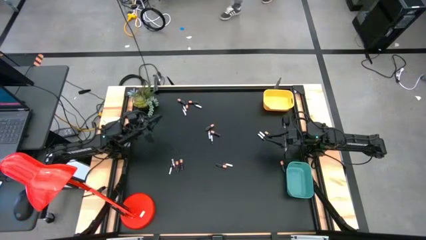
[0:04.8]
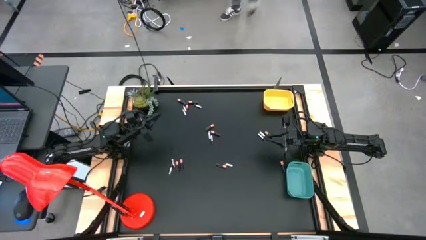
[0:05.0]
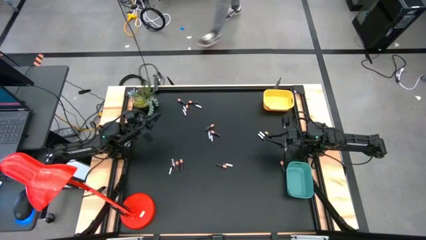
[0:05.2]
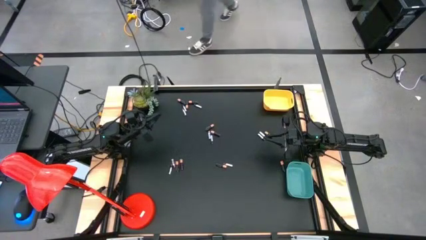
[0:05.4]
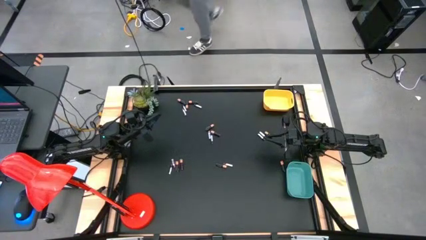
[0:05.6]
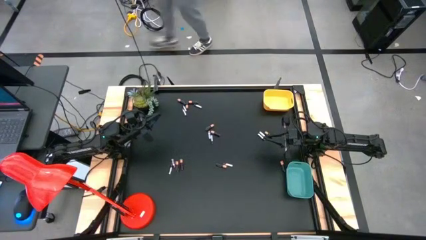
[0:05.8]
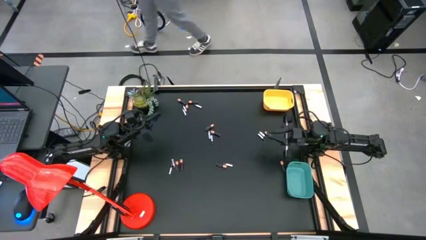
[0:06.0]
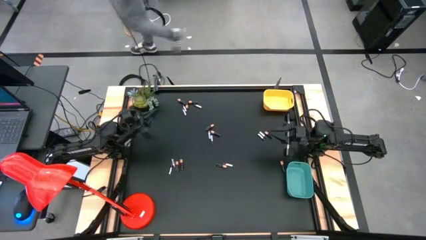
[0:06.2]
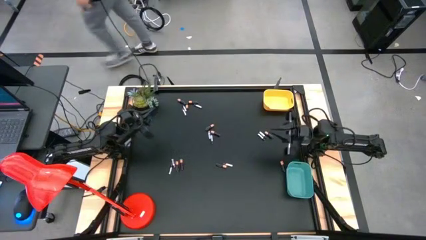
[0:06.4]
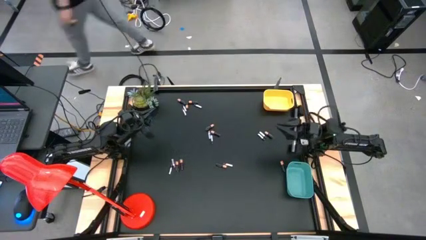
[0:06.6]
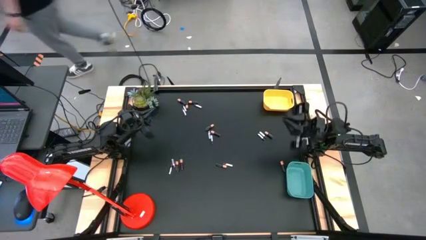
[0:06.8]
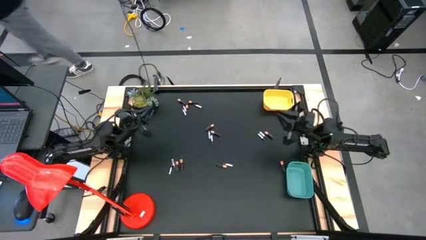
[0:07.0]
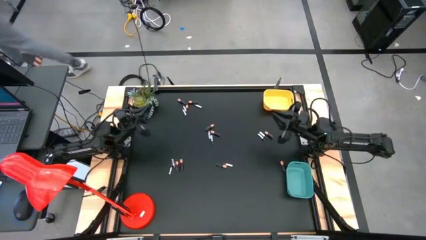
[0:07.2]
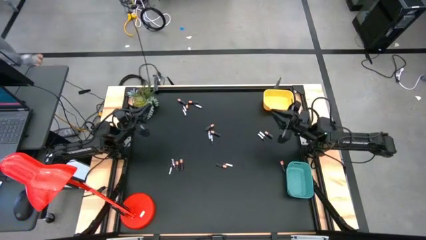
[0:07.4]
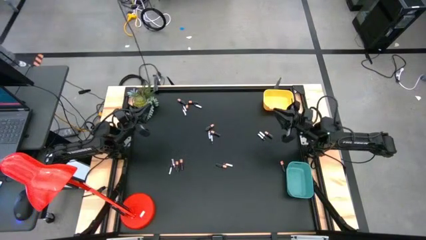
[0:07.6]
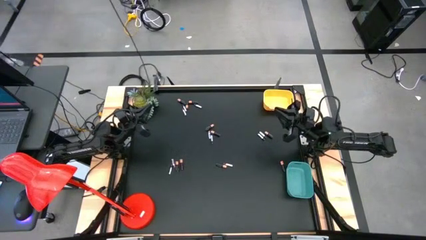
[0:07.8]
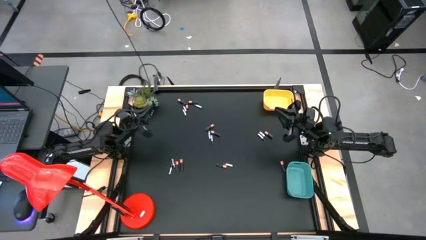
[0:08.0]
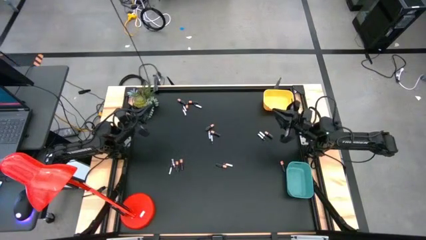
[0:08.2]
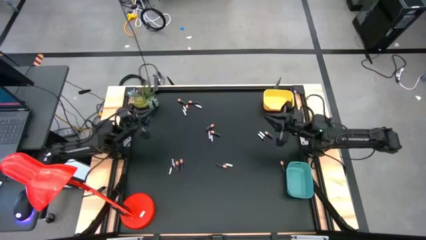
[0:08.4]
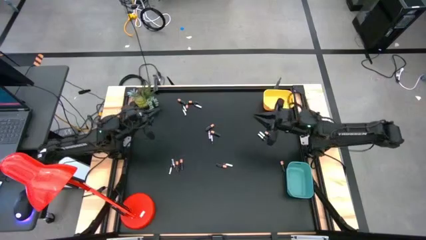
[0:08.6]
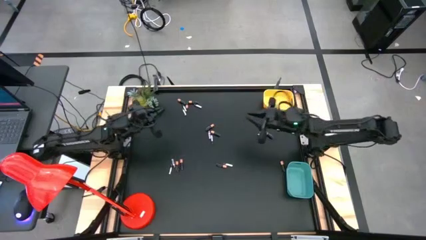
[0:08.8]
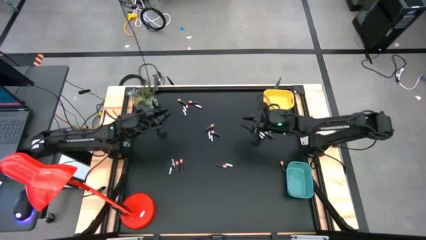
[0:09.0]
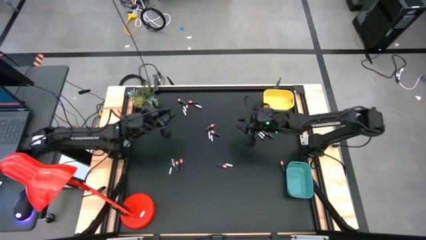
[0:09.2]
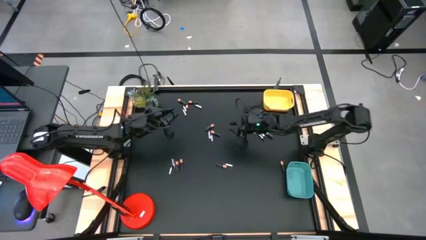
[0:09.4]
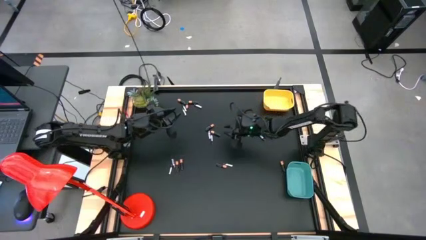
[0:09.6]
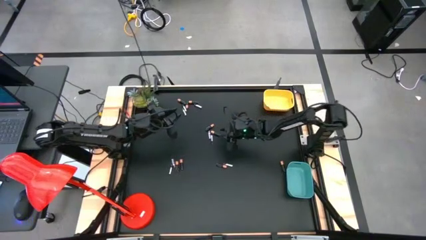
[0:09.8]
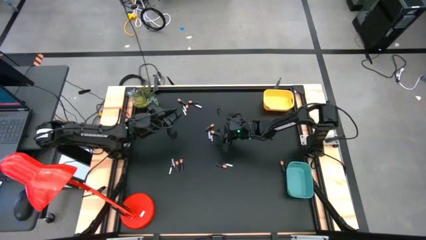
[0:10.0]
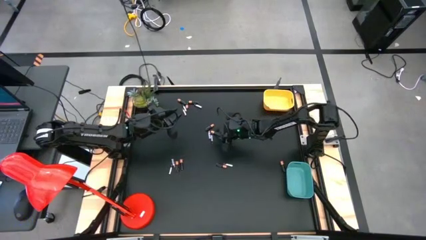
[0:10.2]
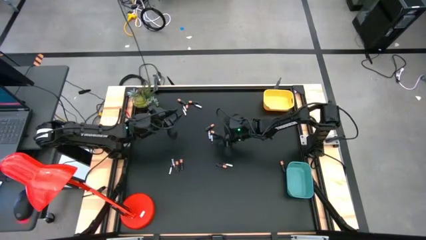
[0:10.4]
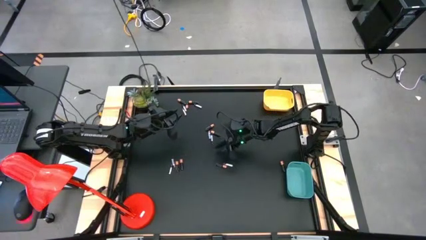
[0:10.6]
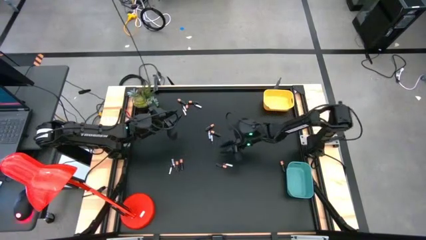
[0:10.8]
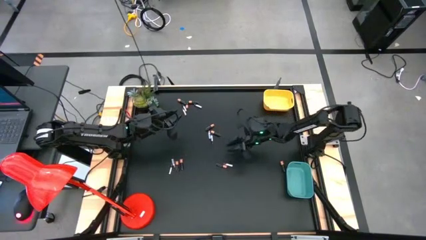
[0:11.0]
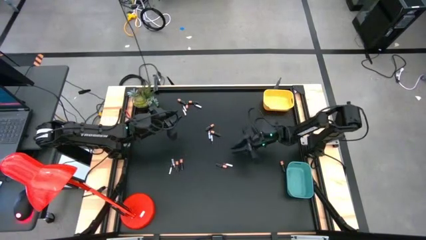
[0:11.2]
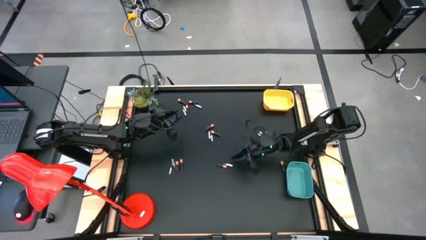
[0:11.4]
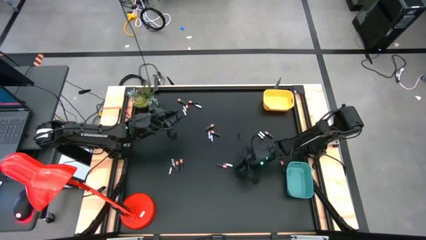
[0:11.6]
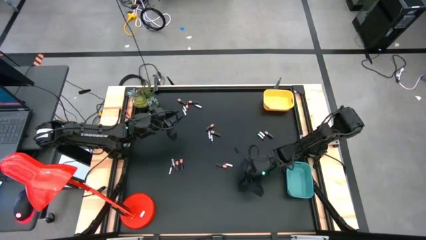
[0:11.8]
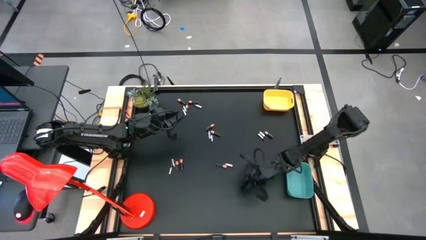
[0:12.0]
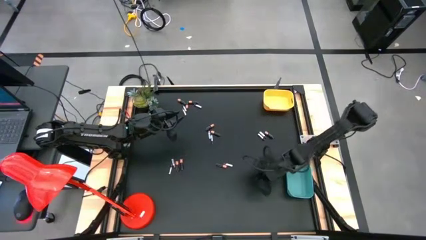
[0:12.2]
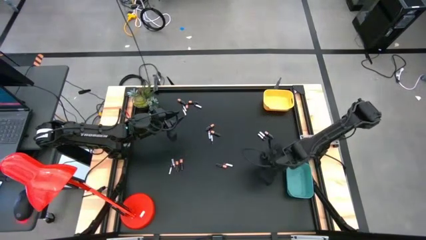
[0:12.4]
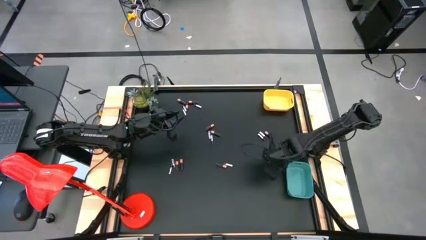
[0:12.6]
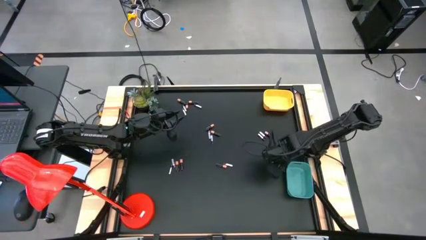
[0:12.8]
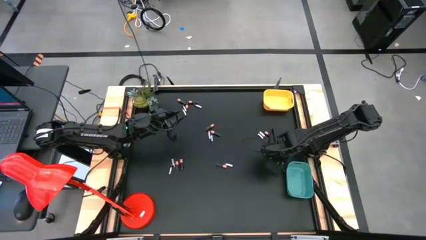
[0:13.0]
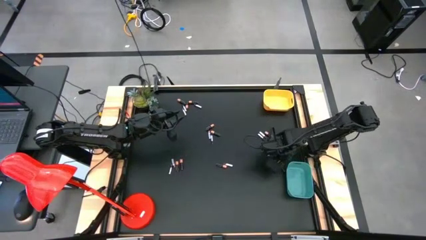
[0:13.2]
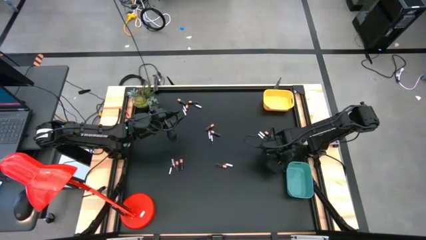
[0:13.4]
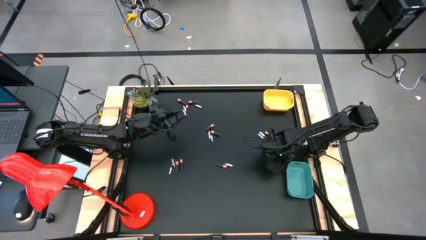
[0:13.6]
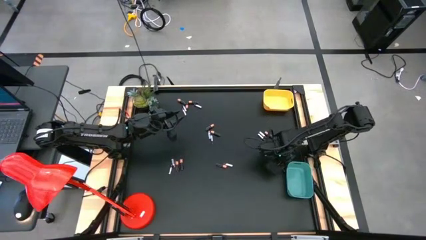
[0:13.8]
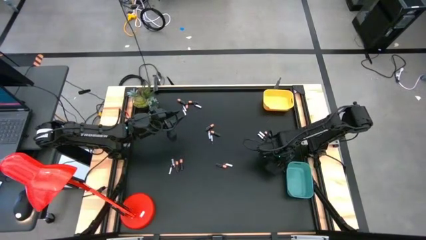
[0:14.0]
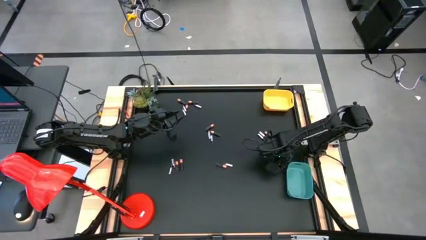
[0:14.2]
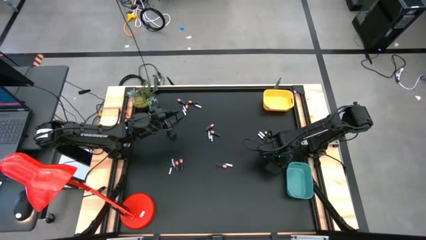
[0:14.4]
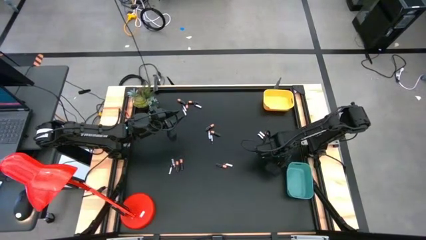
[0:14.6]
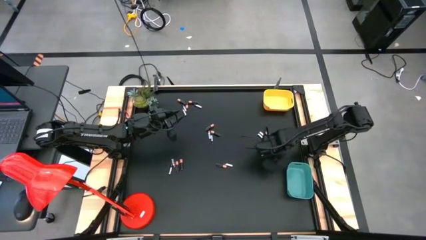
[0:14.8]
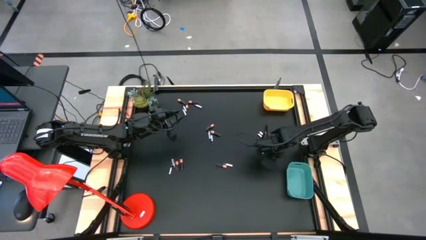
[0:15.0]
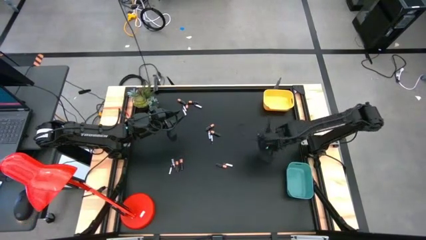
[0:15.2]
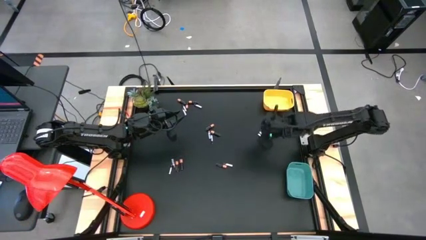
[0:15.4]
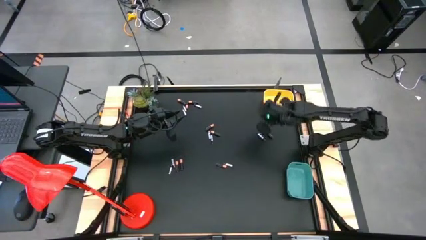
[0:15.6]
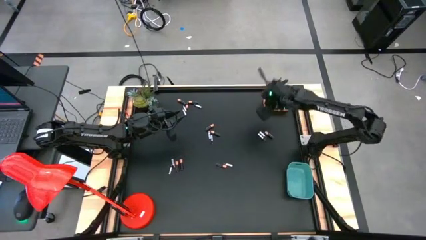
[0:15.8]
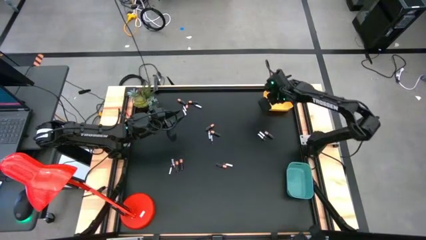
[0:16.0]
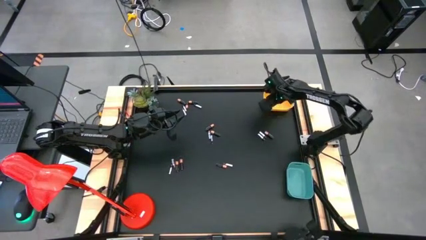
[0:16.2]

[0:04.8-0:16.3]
Task: Sort batteries
Put the black battery into the yellow bin

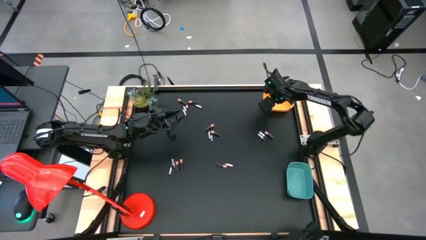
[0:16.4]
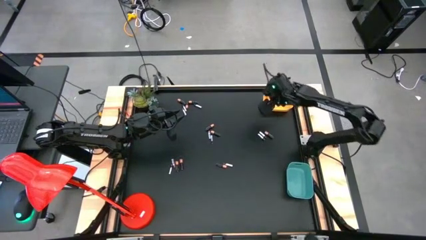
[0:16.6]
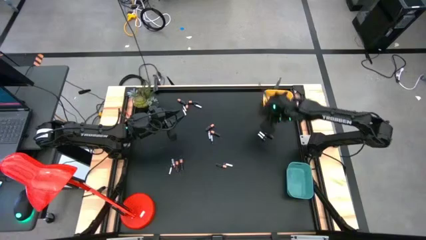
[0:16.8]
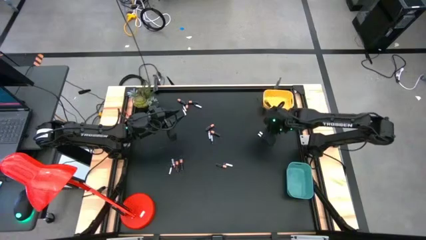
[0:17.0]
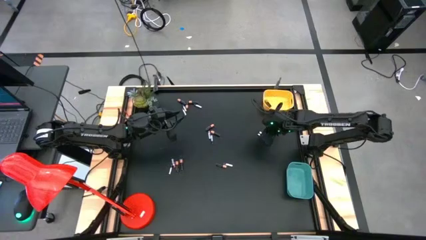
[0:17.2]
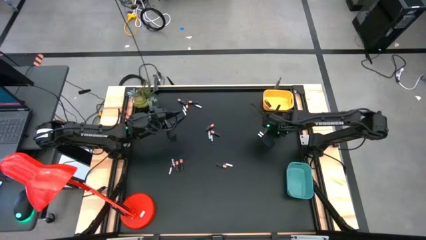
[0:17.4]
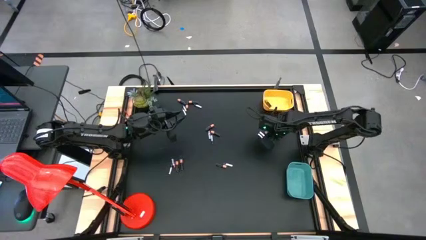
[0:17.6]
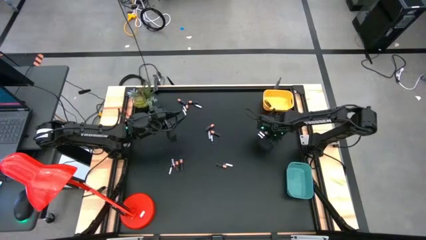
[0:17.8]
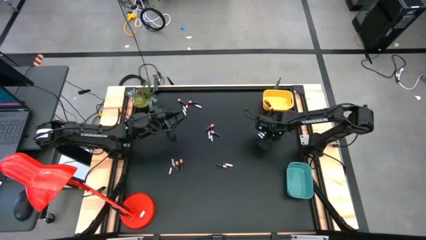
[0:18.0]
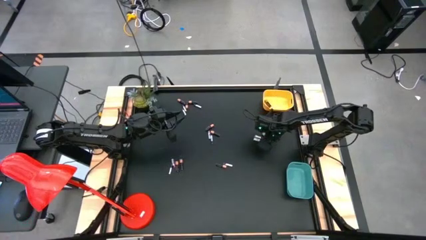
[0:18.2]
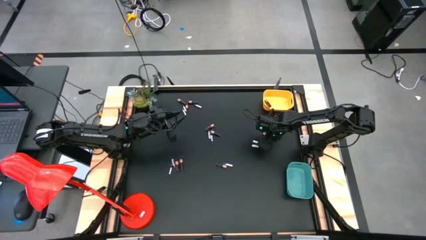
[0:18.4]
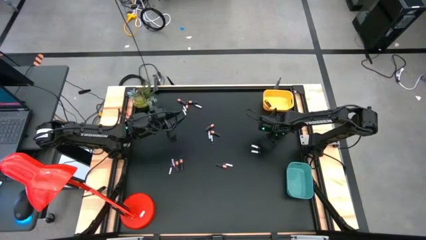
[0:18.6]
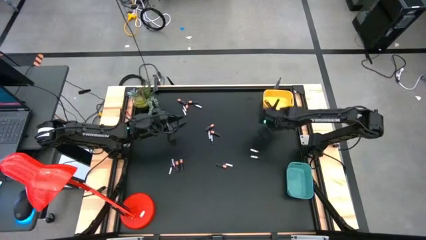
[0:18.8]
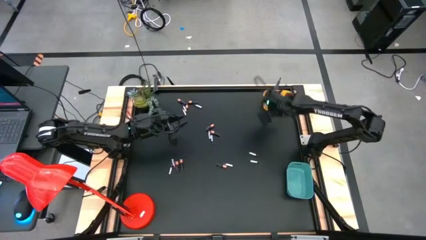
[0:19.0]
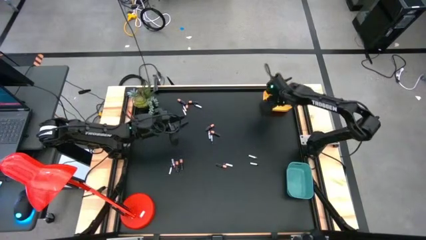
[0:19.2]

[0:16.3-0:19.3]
Put the black battery into the yellow bin

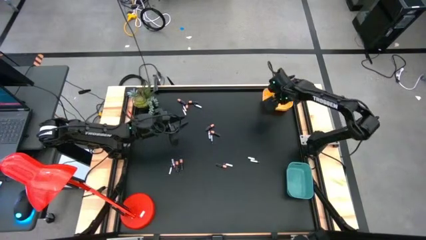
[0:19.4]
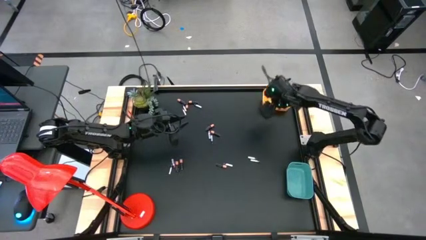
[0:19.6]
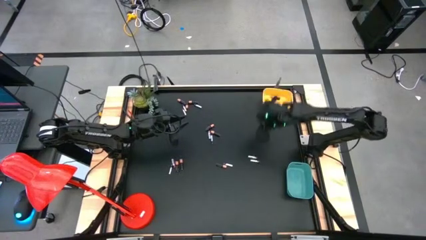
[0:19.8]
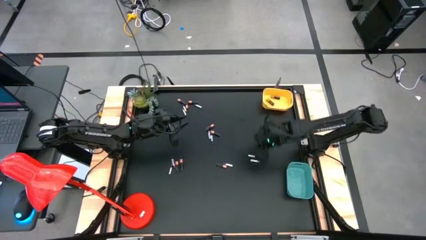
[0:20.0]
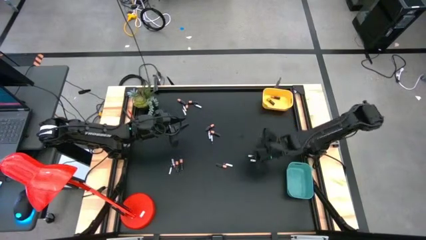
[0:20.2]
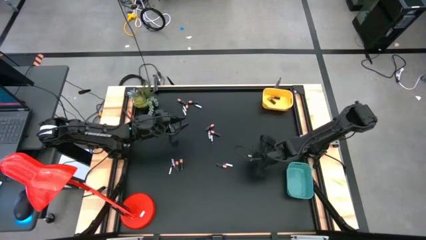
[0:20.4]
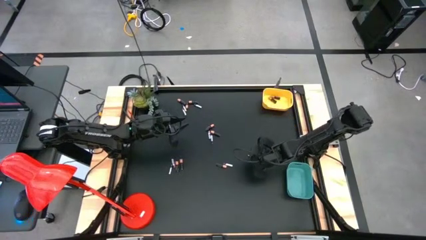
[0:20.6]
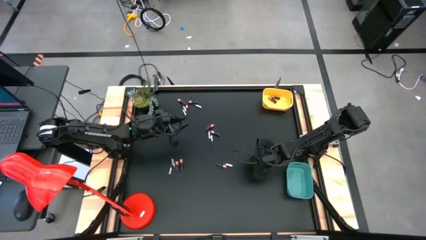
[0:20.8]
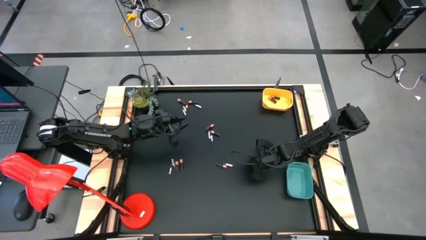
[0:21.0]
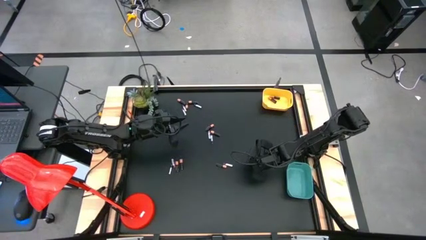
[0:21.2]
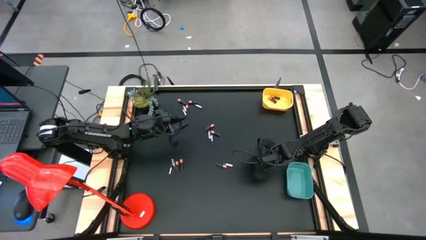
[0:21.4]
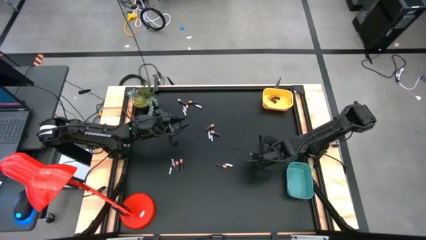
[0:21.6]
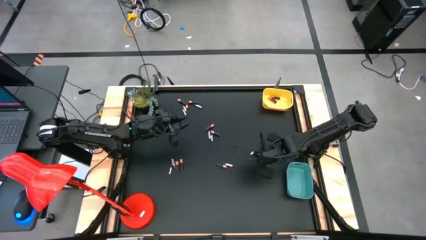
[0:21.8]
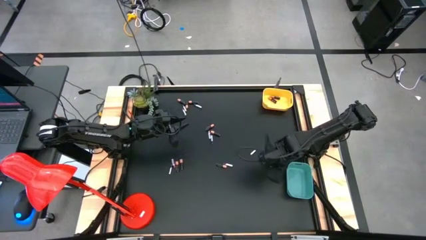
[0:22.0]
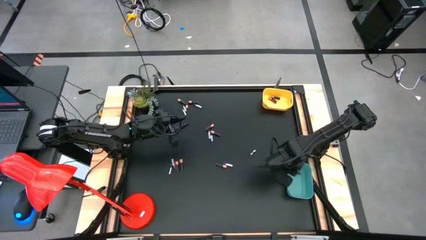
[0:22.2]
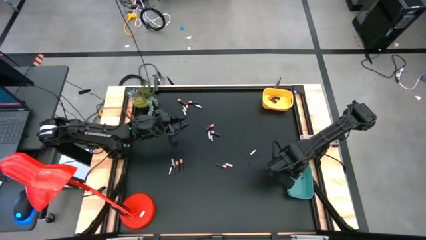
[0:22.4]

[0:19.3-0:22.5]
Put the silver battery into the green bin

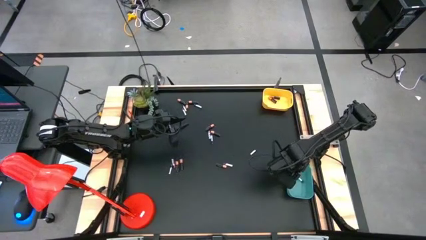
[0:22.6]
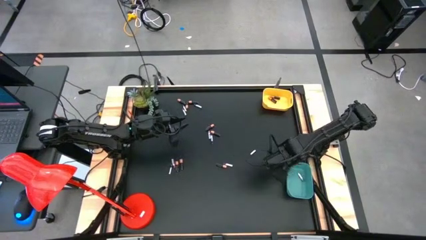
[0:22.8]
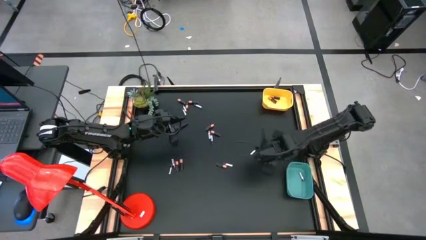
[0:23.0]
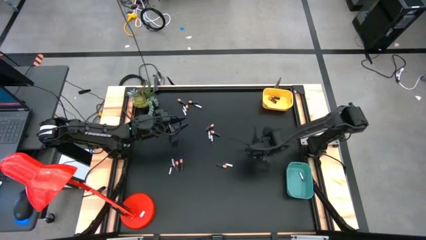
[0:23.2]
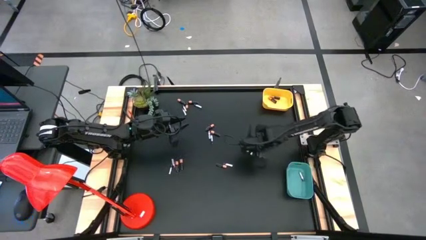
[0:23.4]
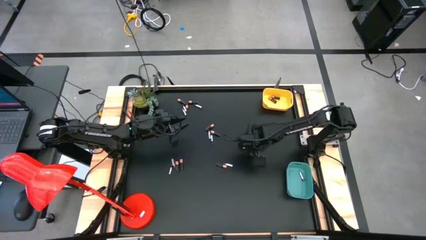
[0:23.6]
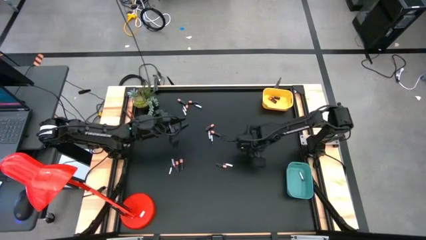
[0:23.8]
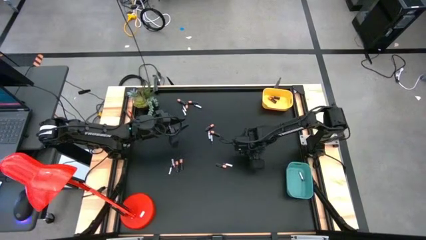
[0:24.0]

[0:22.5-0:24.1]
Put the silver battery into the green bin
